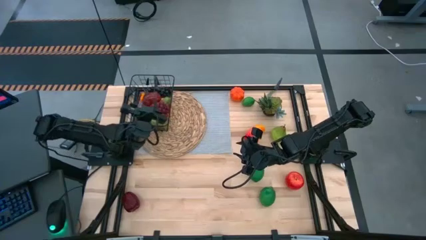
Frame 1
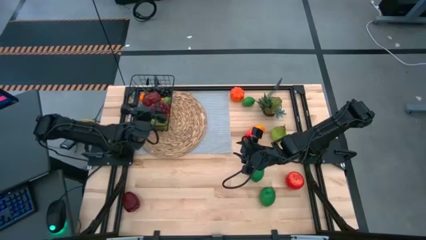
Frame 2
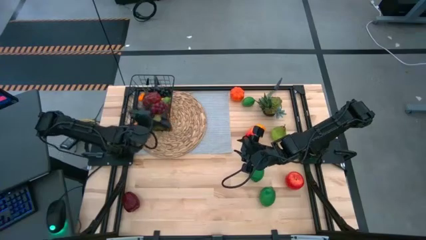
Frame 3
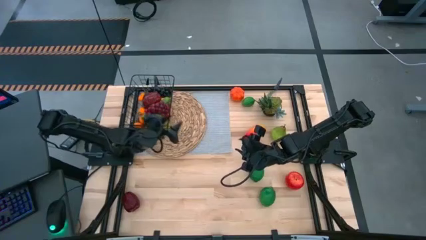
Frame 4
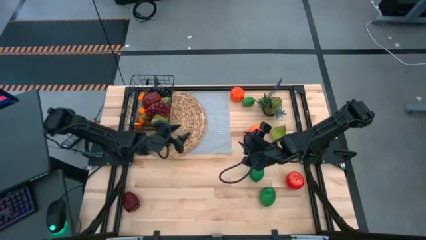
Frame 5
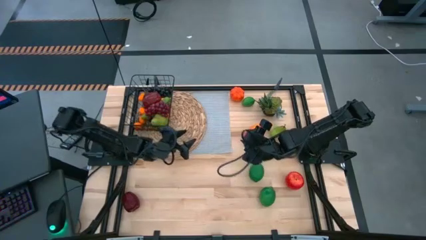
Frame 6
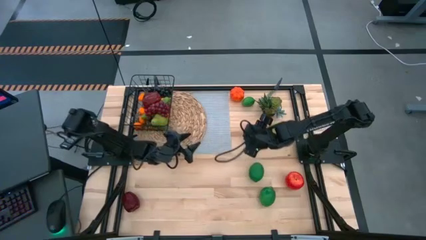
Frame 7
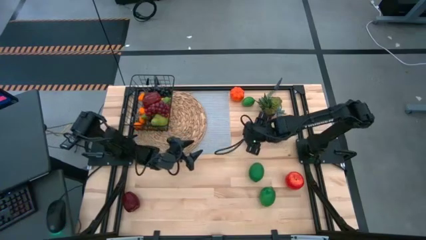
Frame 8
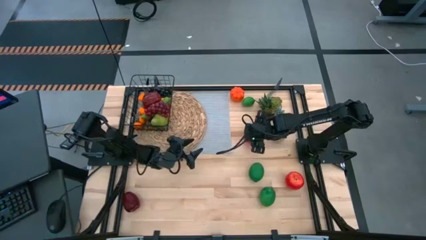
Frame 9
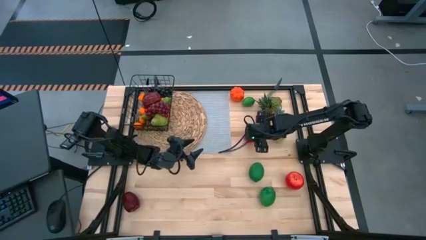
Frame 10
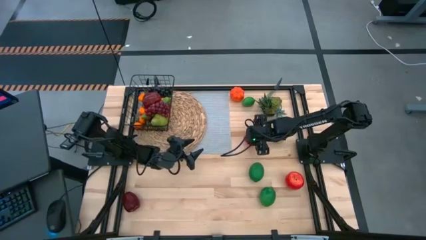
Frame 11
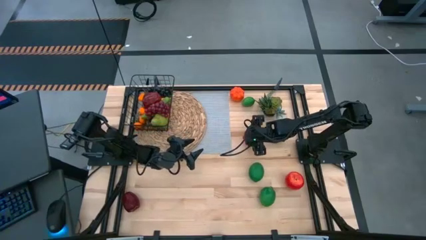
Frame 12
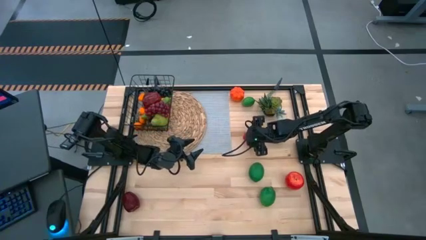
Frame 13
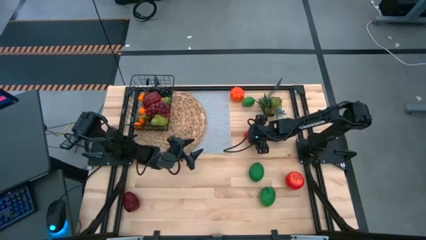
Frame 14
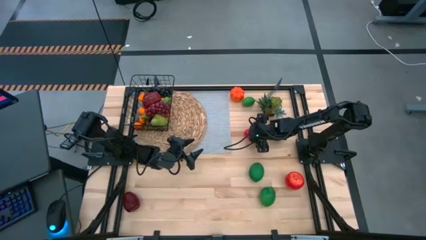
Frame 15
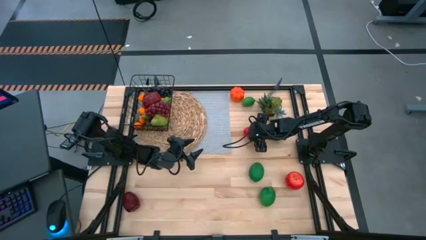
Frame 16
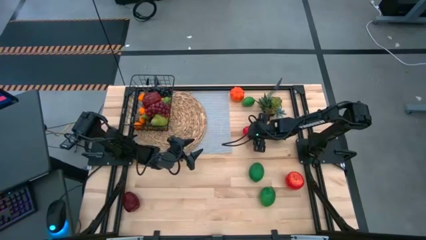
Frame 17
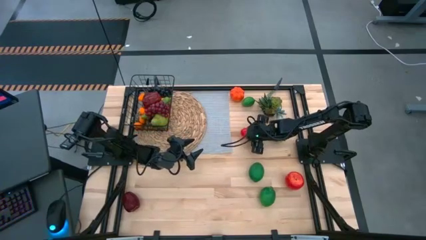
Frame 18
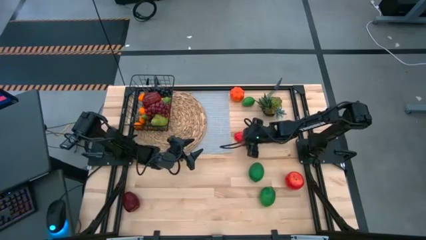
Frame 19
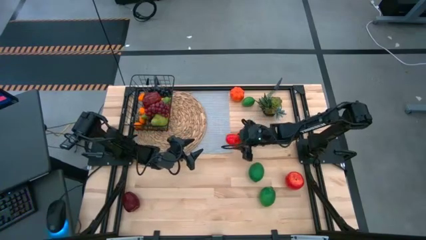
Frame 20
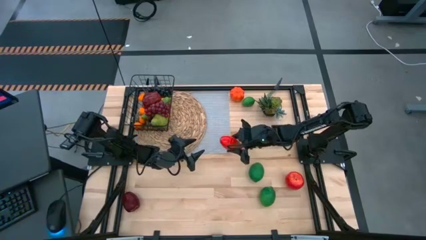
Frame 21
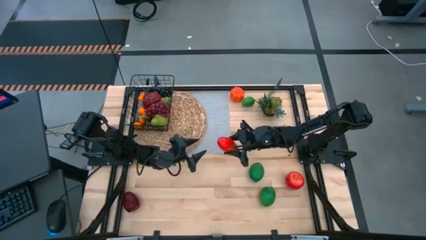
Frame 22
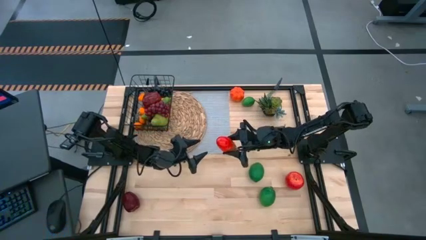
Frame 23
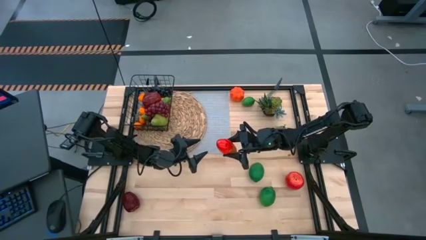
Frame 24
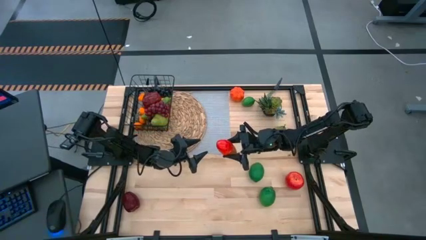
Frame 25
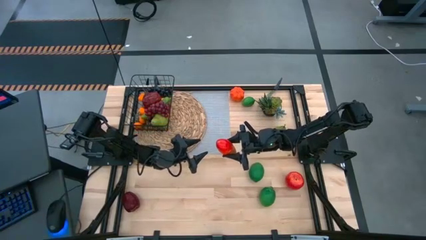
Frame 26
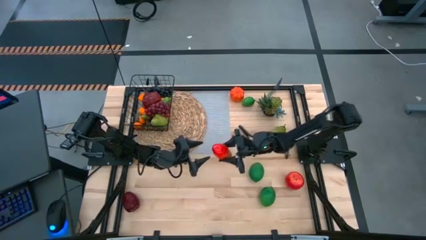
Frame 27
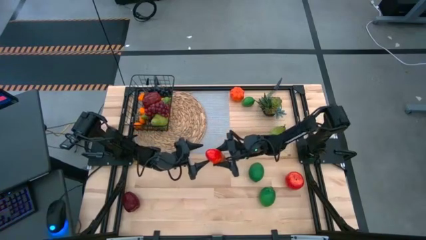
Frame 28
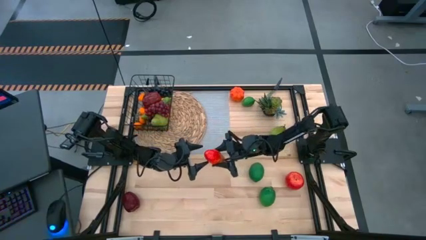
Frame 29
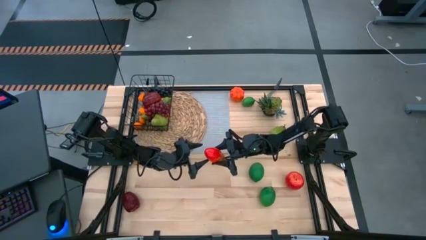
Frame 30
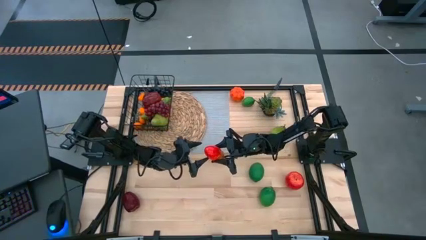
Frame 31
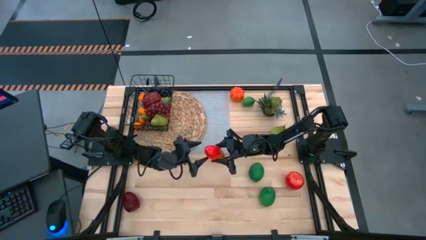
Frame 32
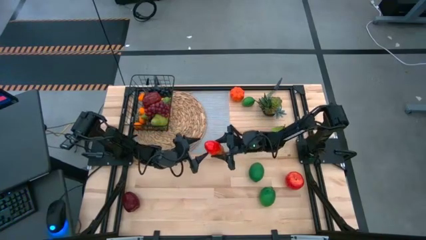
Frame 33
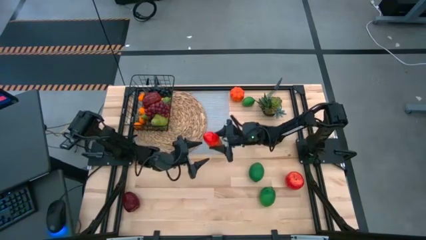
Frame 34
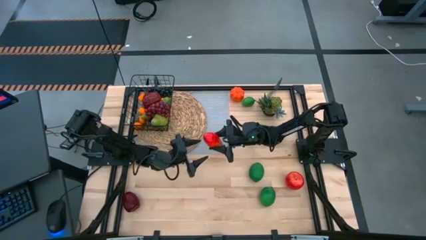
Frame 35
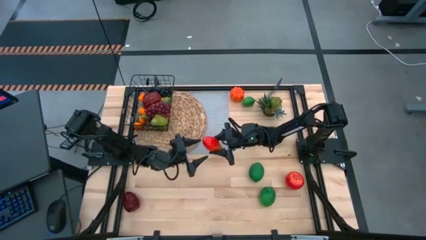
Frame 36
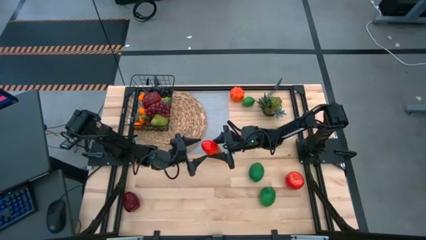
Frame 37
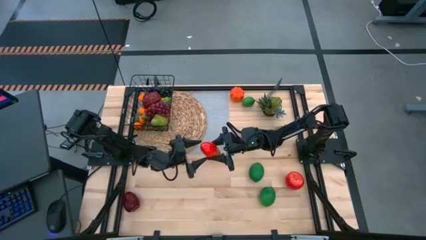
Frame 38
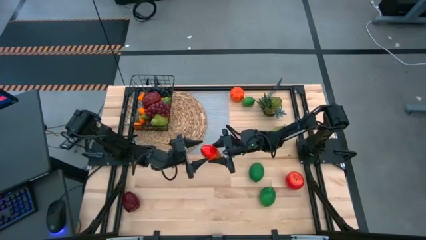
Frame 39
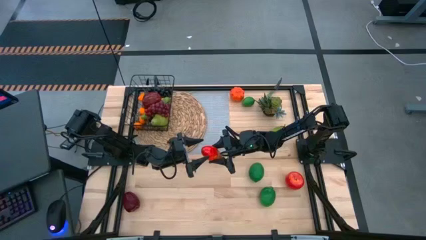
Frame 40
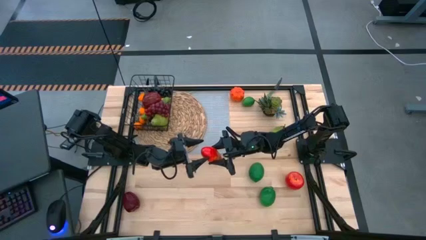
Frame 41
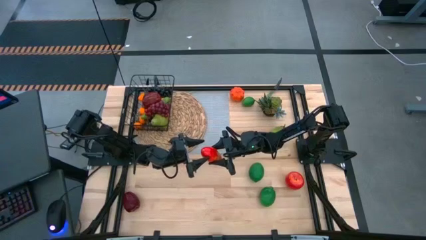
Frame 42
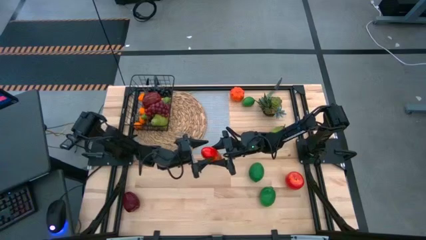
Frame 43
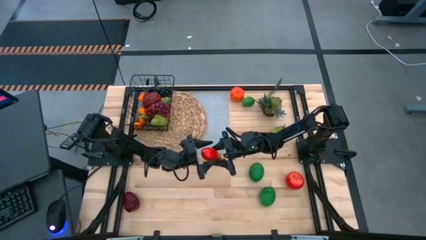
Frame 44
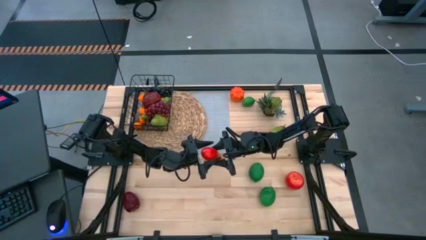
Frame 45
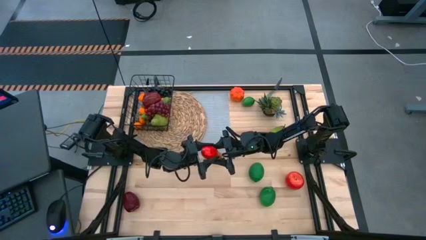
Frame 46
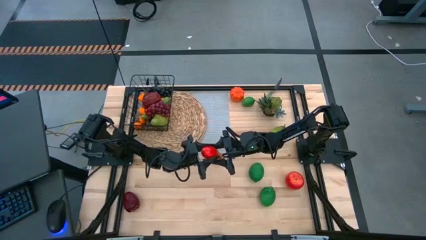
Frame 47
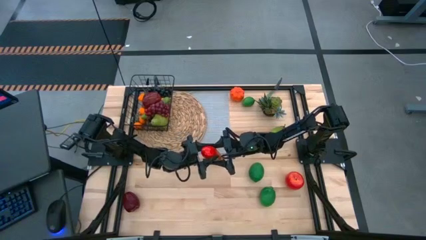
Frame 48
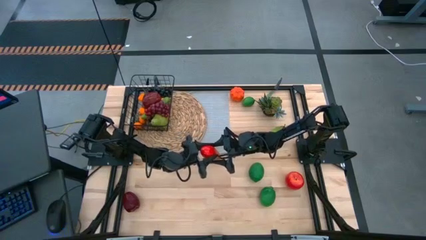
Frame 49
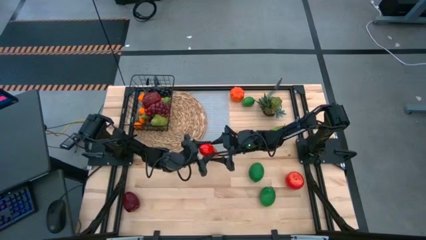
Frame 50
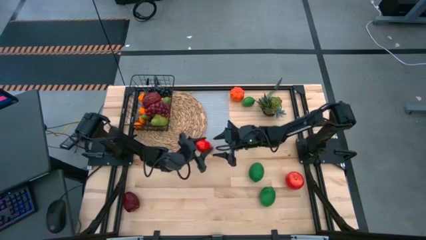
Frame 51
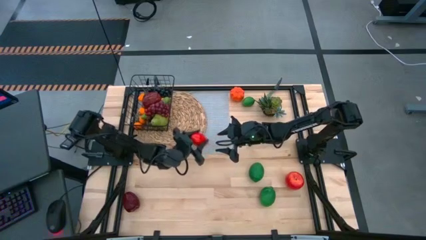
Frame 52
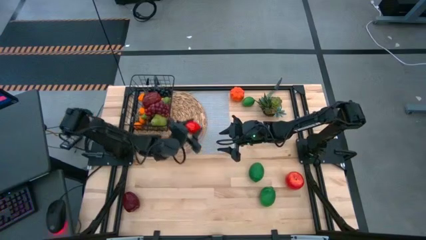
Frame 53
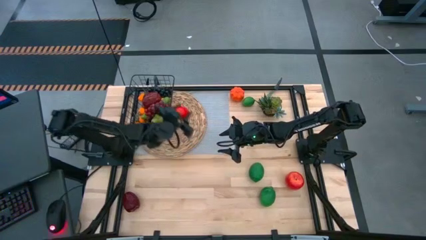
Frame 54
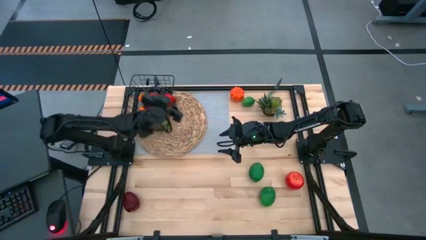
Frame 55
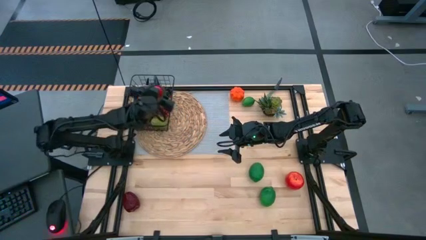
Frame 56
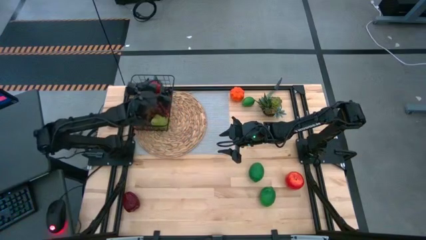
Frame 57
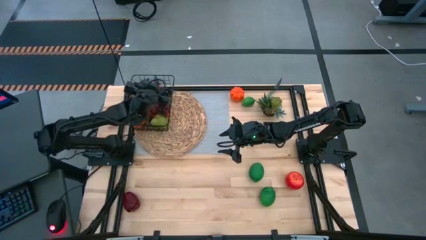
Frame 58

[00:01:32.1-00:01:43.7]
Task: Build produce basket
Put the red mango into the wire basket

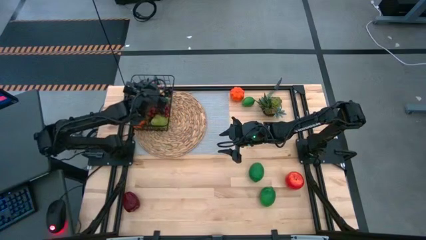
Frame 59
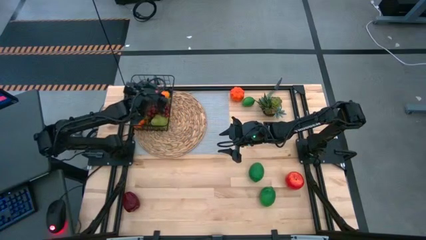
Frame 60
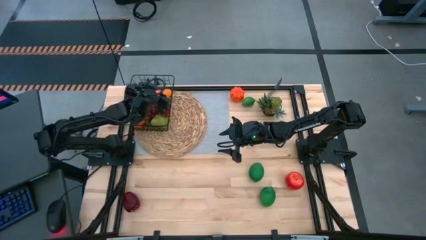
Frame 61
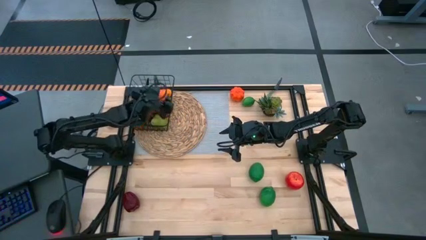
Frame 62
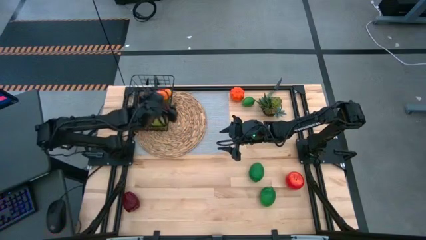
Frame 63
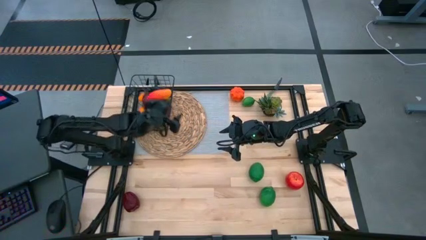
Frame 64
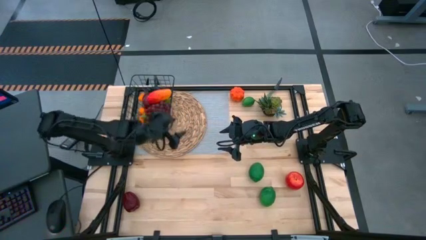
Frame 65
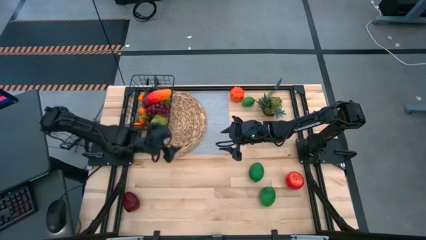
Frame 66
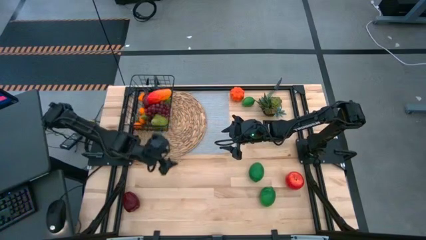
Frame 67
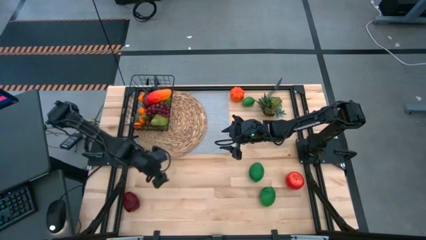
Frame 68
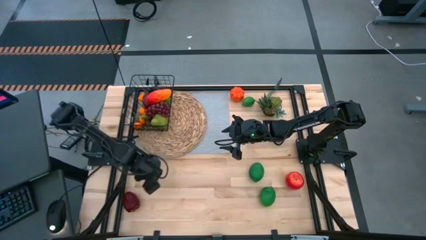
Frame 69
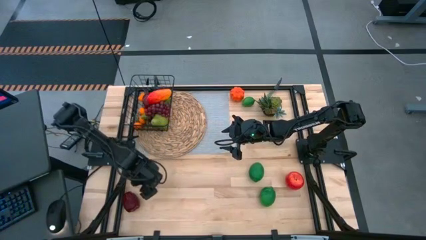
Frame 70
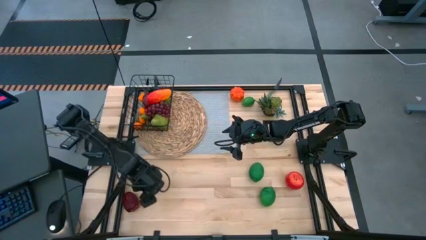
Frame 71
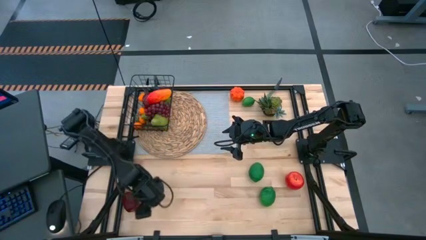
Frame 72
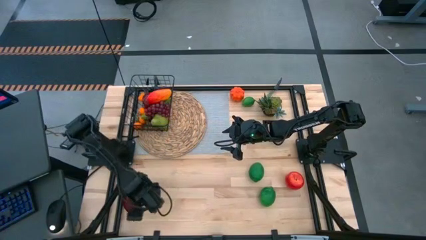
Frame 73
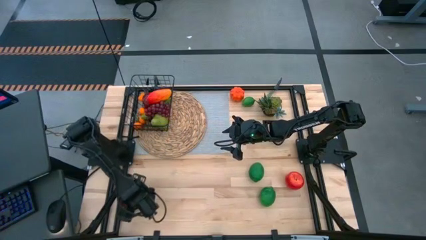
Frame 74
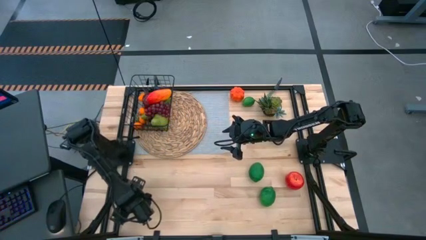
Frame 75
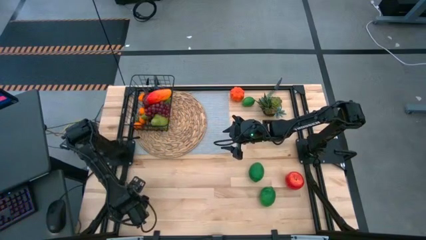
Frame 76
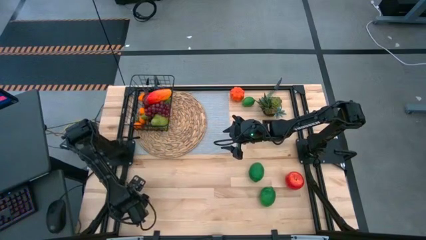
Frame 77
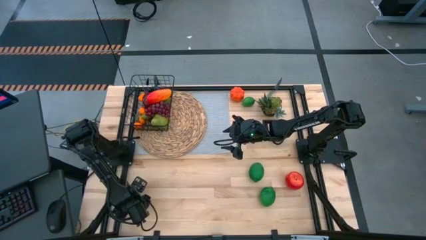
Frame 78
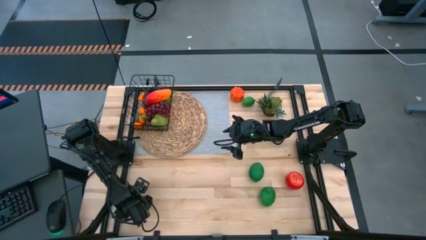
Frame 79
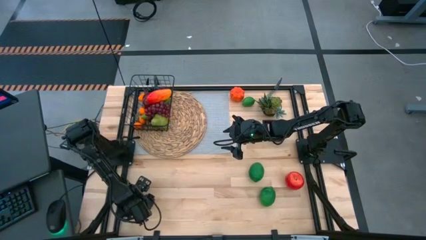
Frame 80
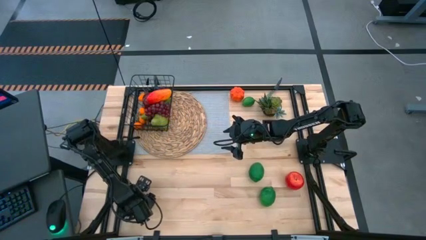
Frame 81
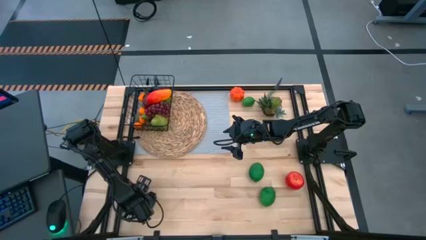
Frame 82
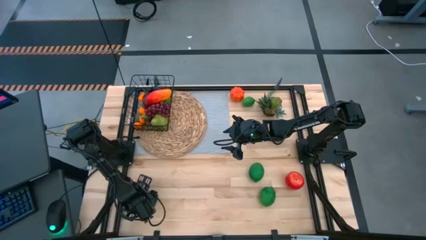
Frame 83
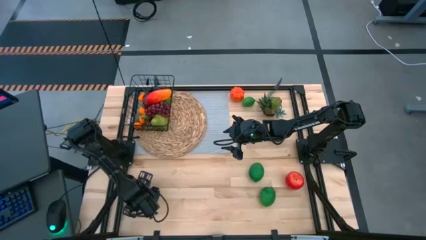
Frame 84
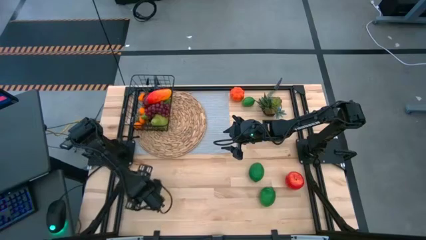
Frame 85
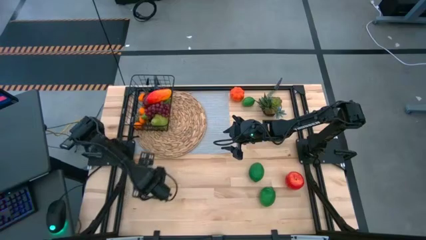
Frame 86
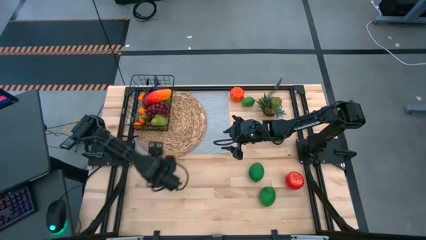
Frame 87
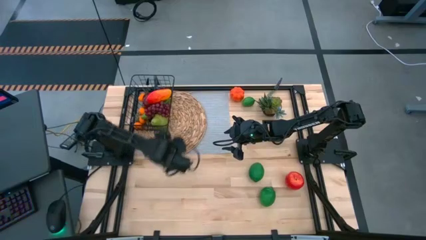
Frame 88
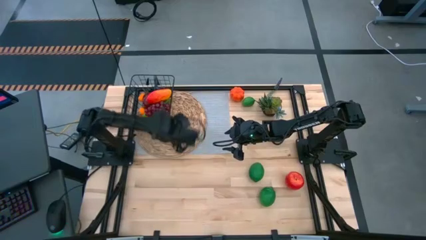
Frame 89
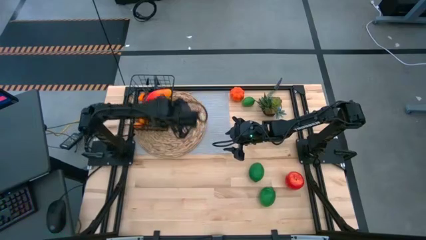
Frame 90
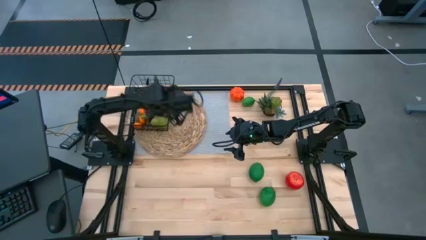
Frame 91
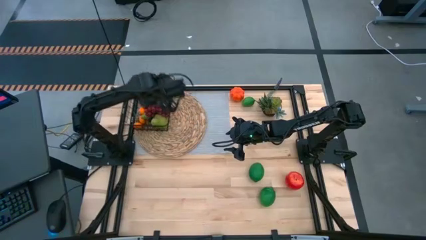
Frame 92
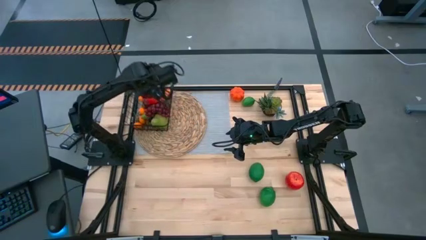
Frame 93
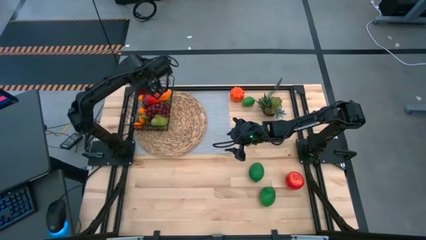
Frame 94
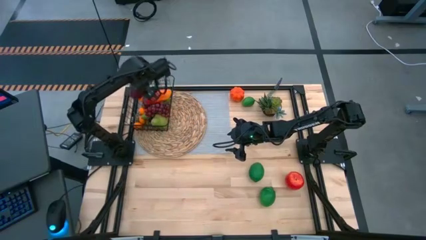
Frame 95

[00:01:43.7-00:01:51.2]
Put the dark red apple into the wire basket
